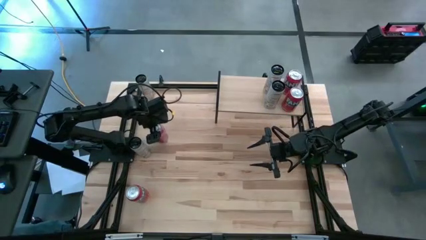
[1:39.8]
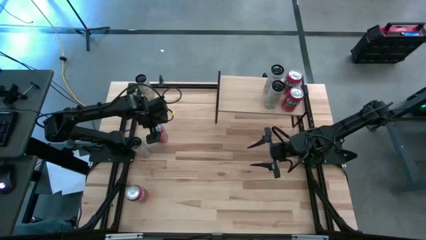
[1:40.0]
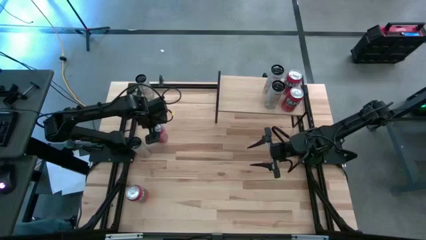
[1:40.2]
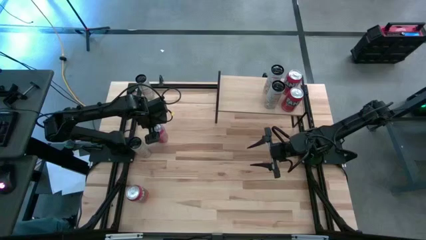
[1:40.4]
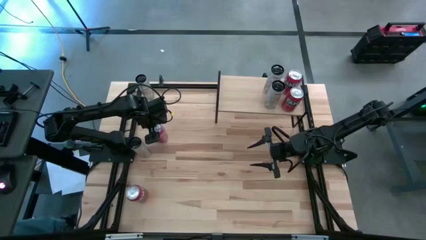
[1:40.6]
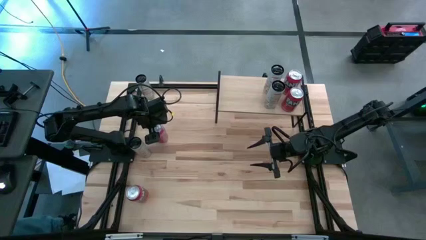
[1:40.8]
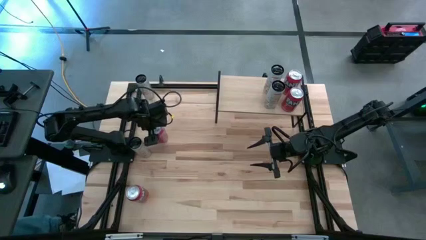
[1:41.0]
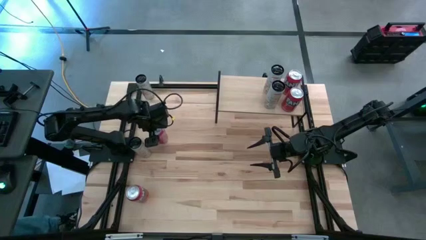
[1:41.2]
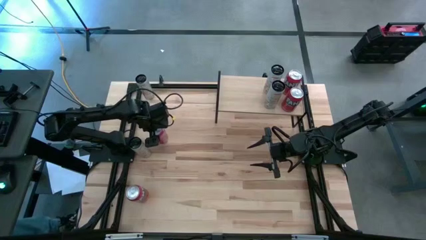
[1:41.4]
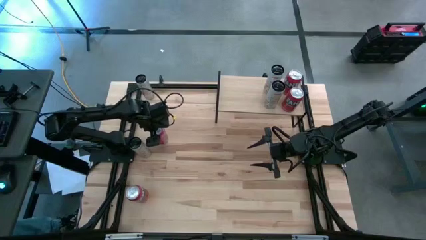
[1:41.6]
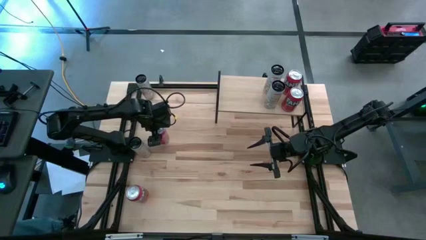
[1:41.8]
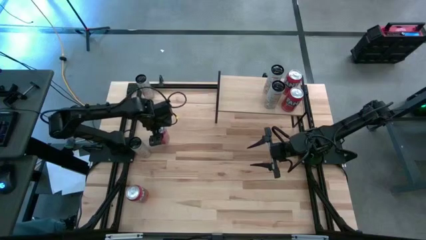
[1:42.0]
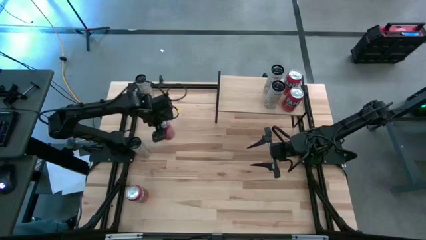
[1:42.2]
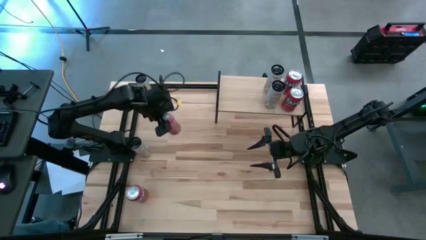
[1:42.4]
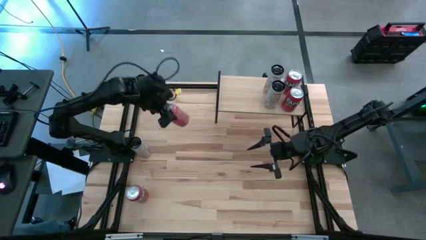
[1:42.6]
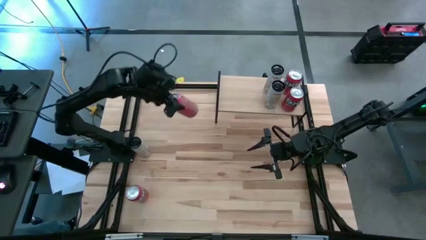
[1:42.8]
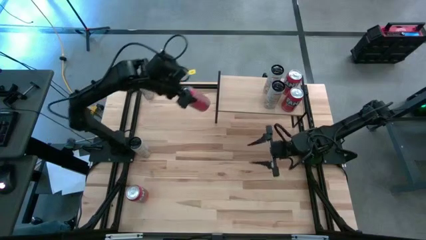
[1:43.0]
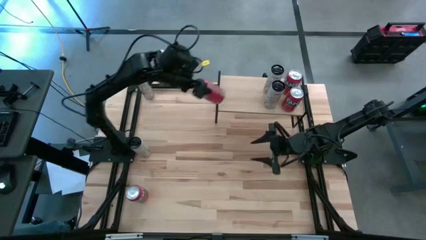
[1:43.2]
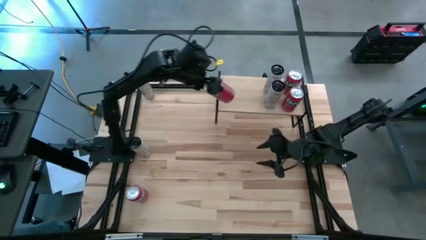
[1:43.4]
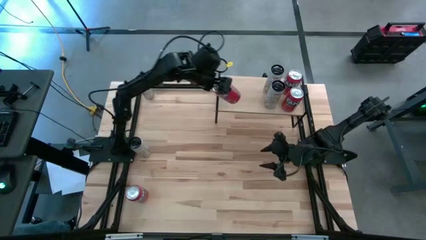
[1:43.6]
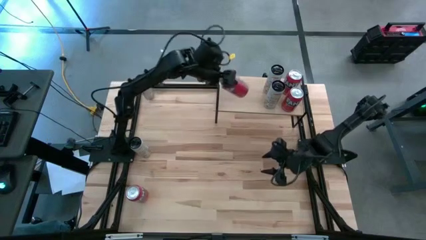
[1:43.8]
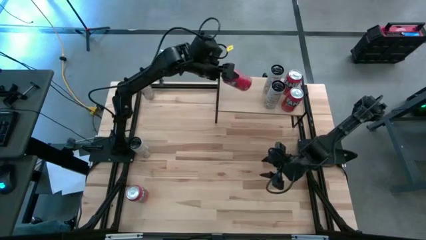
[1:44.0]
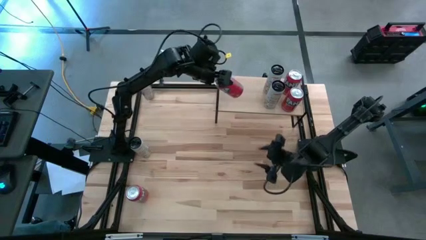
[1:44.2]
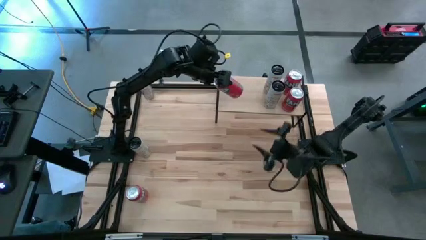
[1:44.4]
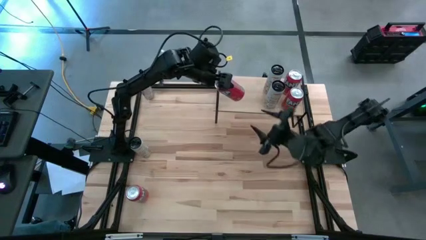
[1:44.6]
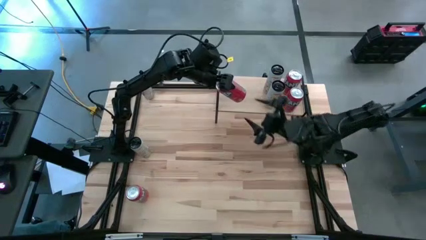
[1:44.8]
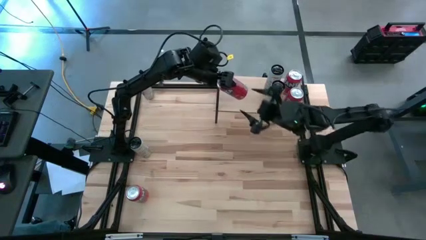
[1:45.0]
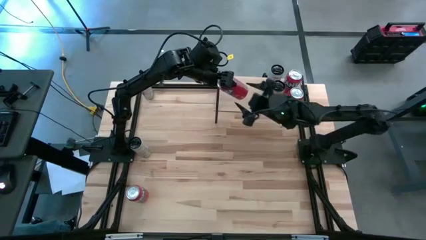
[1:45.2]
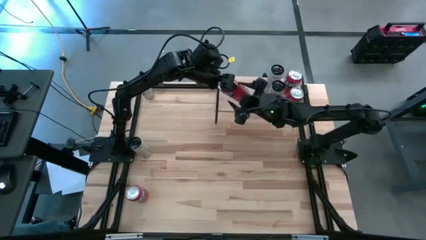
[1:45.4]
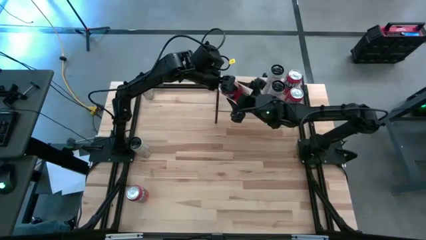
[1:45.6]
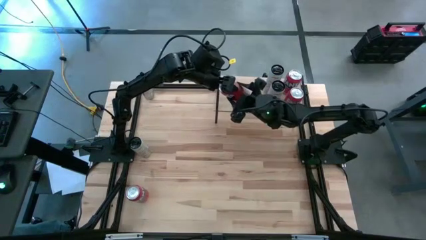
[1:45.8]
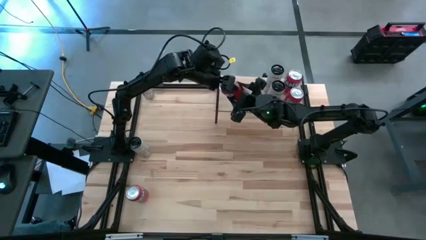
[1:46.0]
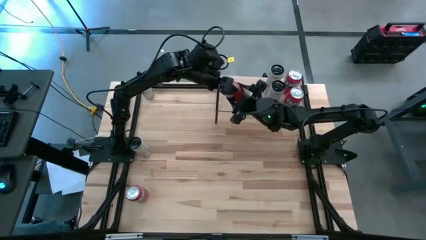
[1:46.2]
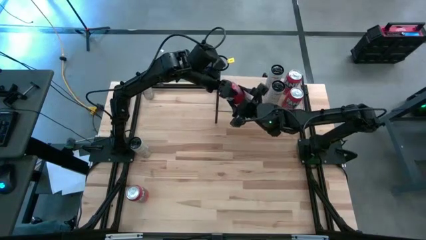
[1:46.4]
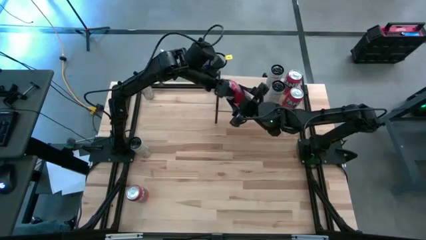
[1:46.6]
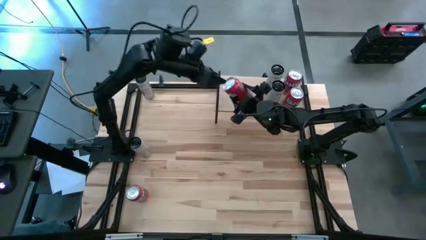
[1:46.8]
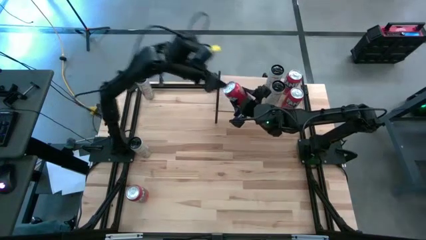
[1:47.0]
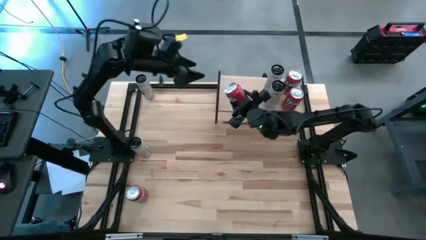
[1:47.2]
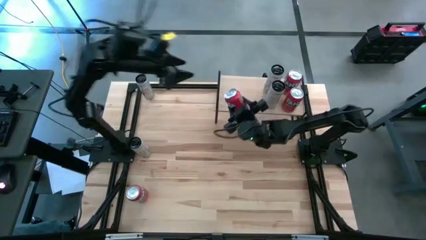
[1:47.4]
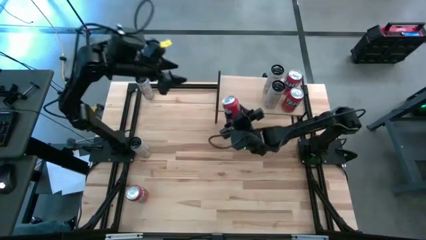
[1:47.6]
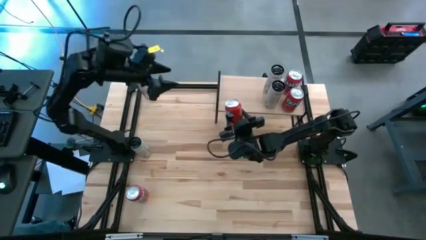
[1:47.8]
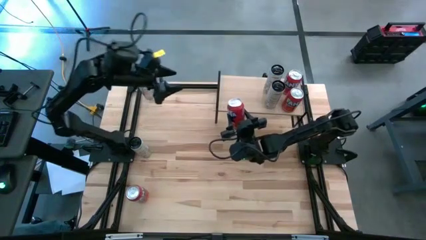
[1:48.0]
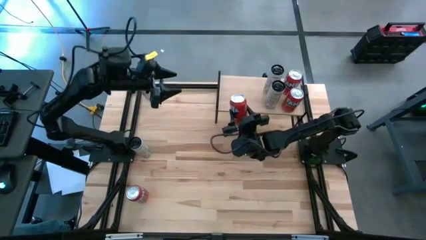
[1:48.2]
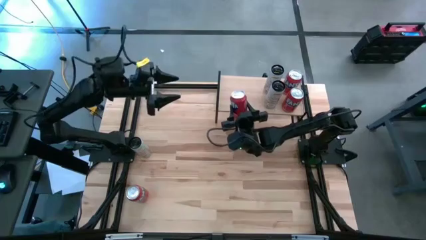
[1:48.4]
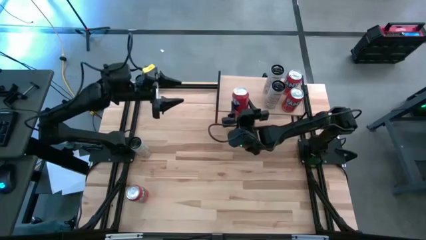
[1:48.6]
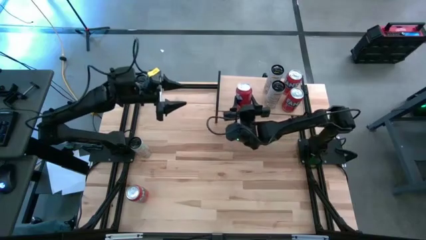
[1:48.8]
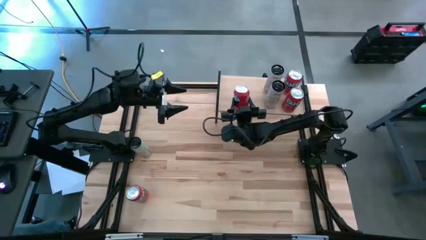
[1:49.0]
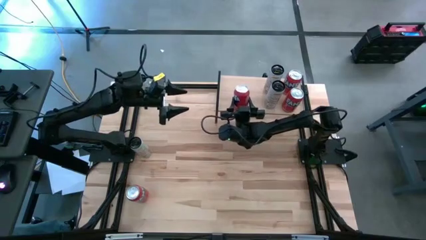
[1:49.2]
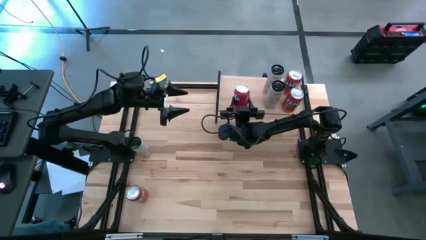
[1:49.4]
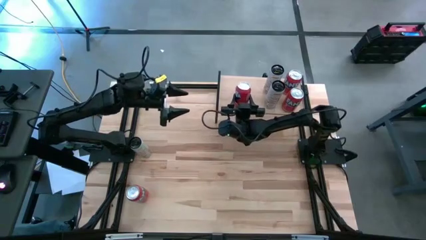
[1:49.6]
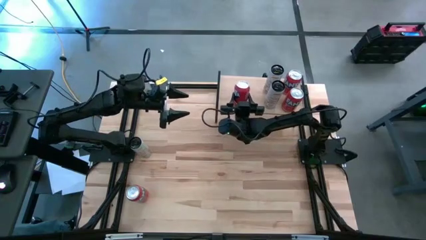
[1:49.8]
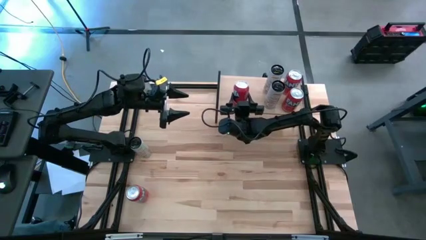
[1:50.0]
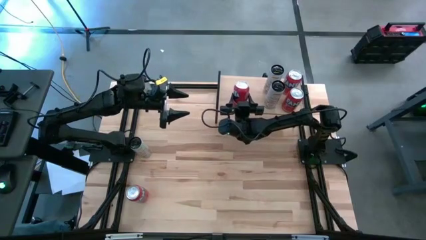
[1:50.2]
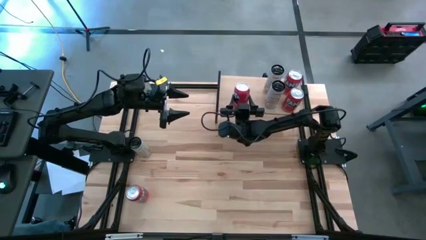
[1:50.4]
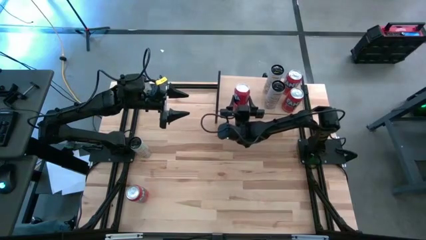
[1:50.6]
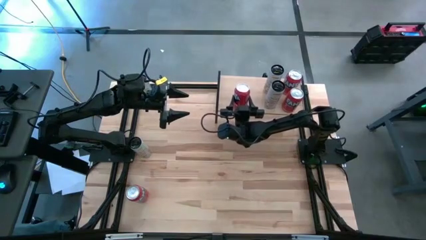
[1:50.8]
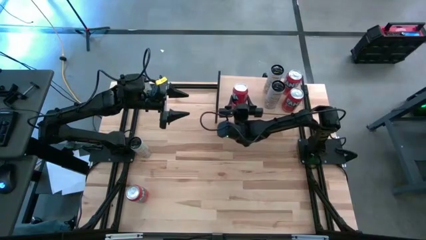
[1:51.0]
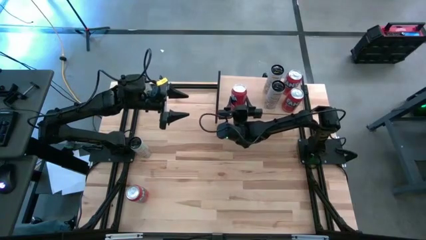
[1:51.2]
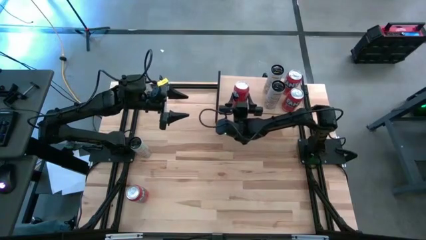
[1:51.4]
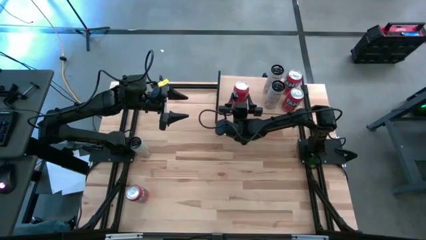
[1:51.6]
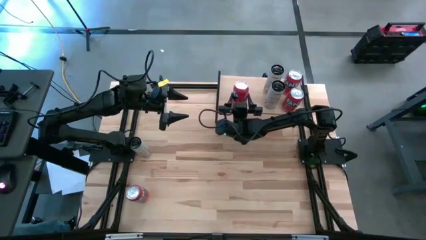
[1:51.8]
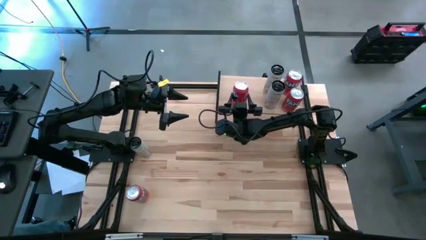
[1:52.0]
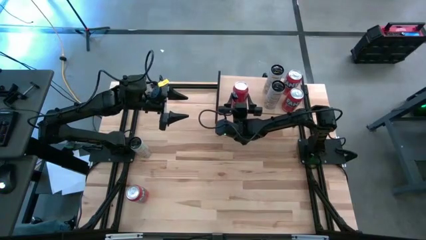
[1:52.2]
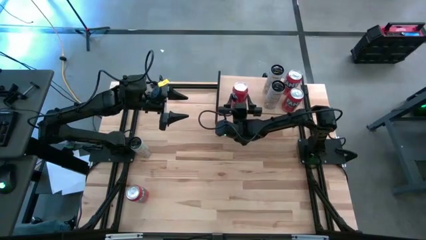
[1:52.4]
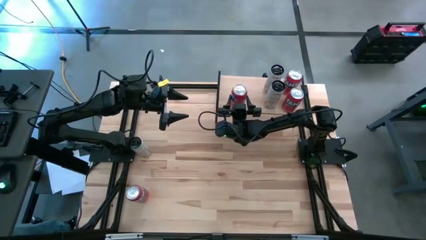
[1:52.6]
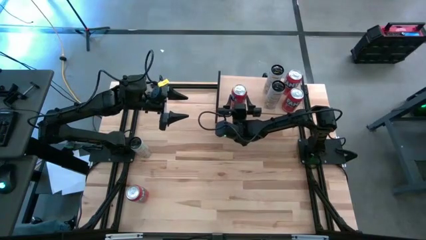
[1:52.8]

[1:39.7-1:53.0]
Task: Place canned beverage on shelf
Put the orange soda can on the shelf
